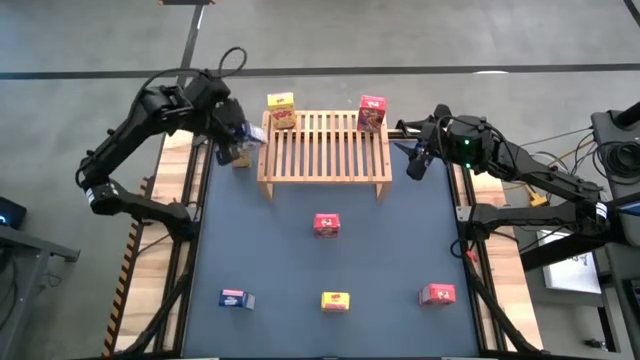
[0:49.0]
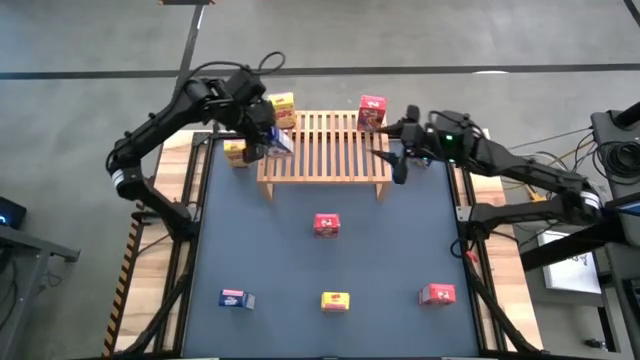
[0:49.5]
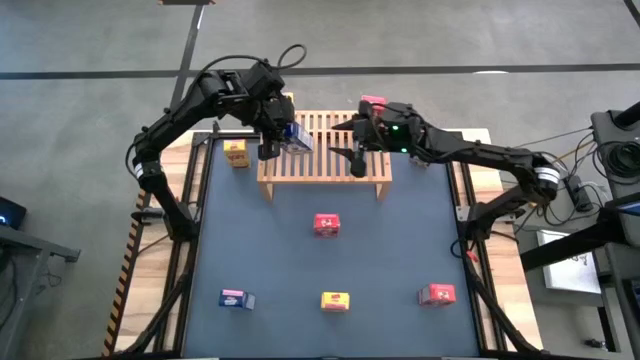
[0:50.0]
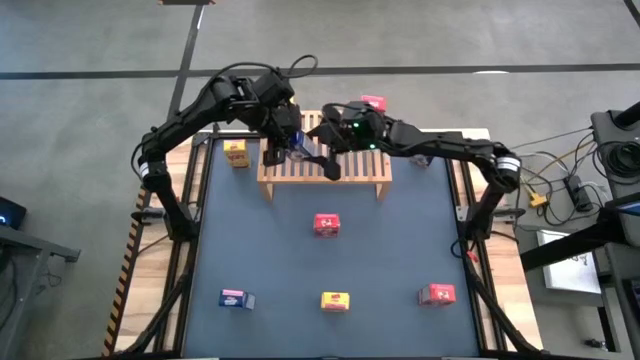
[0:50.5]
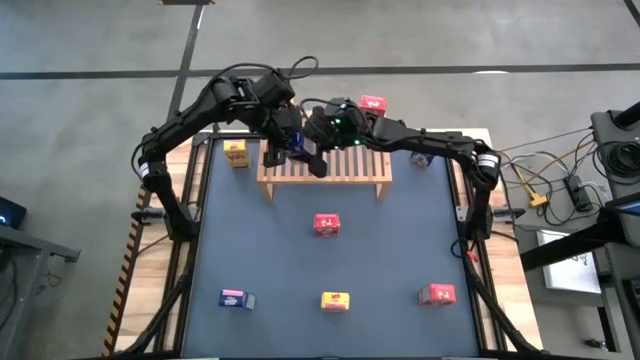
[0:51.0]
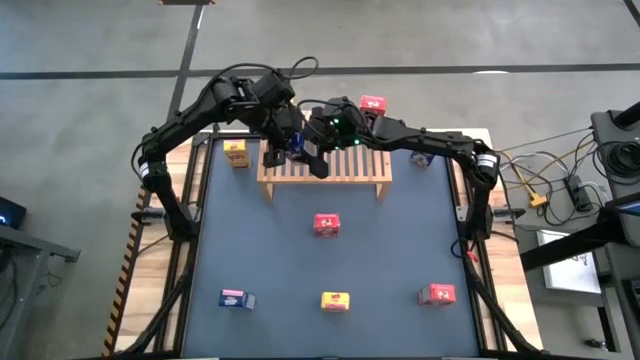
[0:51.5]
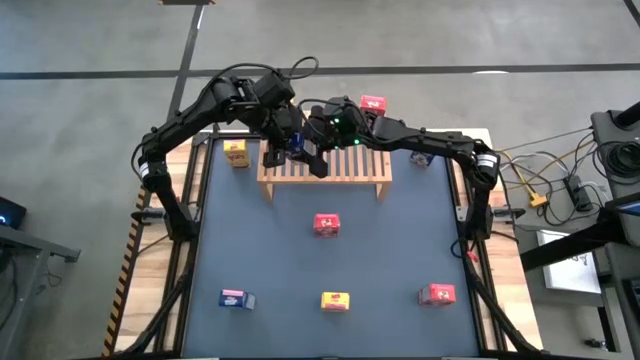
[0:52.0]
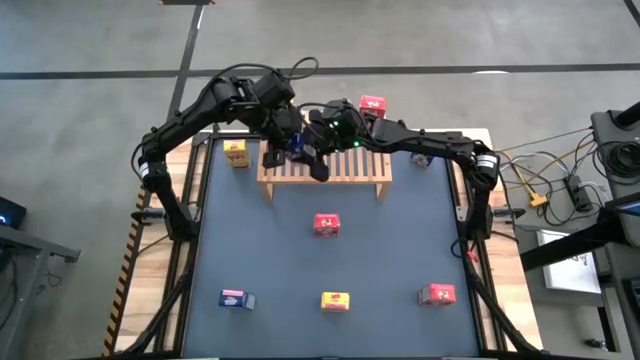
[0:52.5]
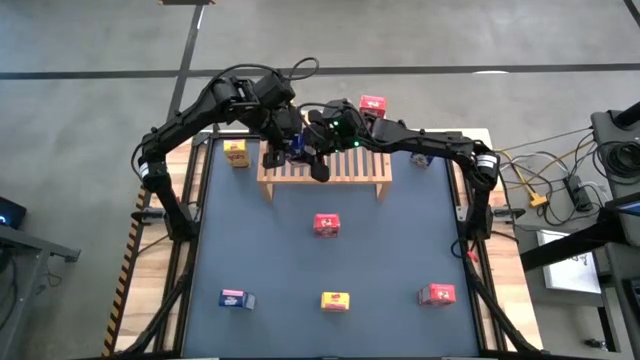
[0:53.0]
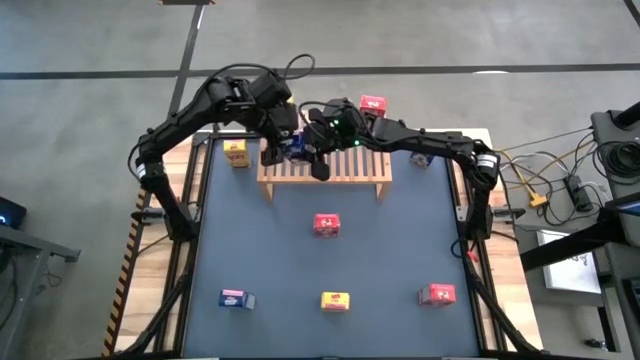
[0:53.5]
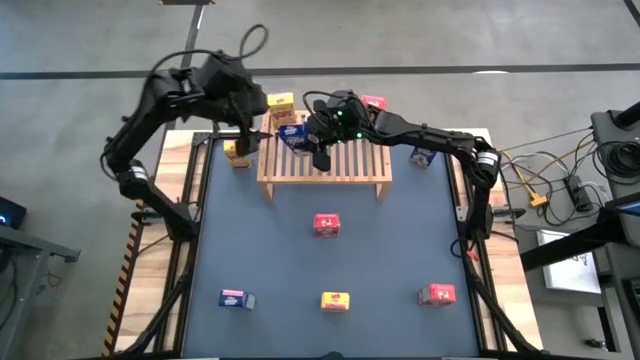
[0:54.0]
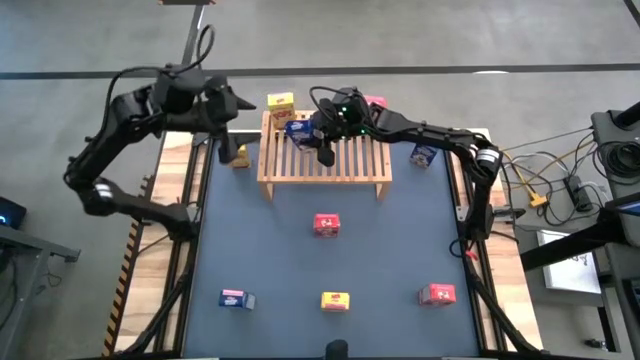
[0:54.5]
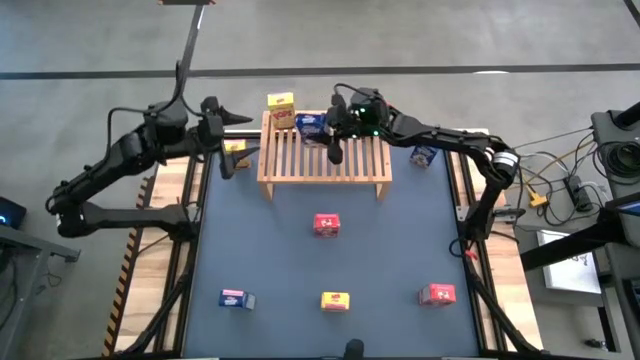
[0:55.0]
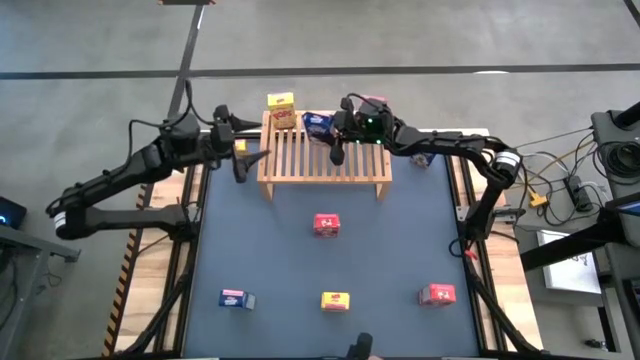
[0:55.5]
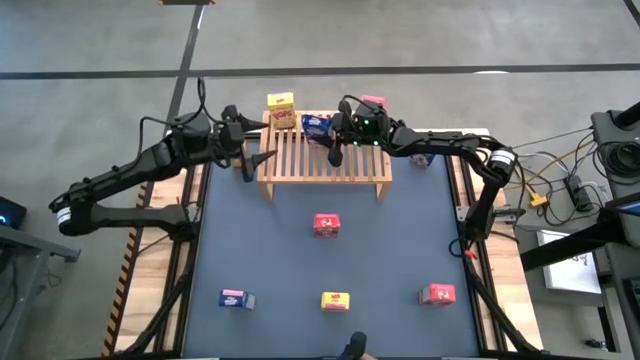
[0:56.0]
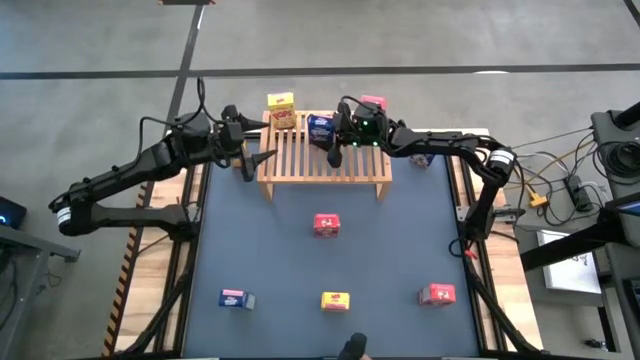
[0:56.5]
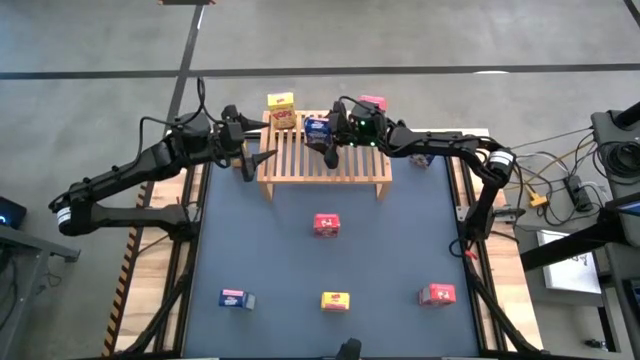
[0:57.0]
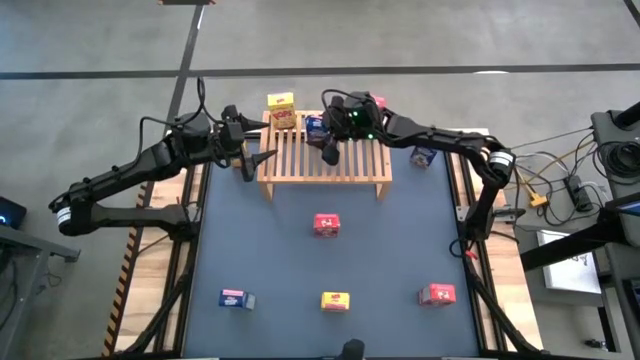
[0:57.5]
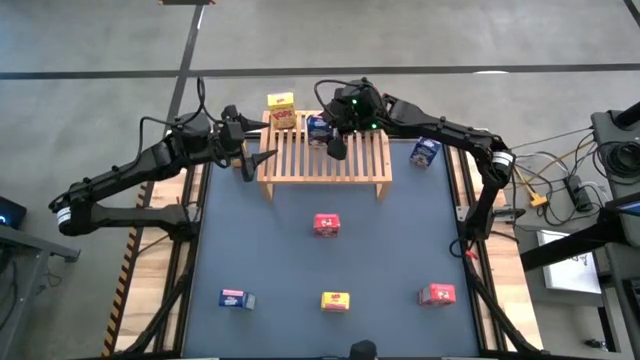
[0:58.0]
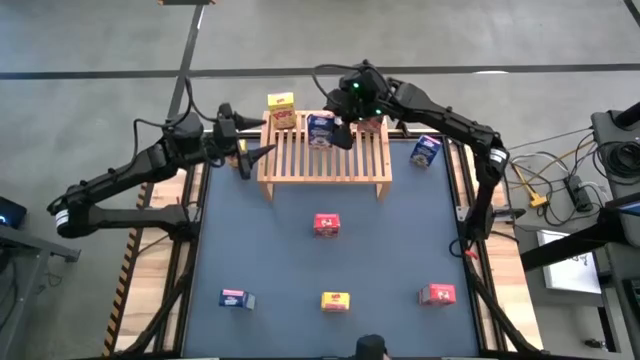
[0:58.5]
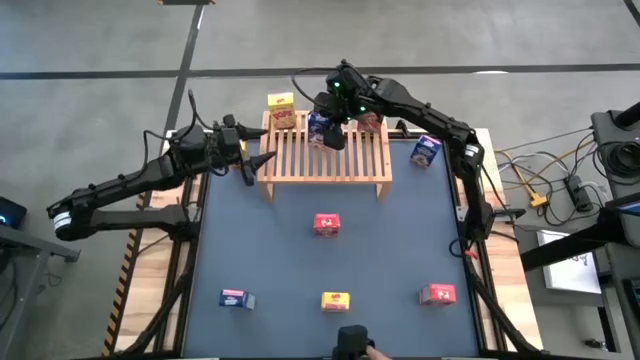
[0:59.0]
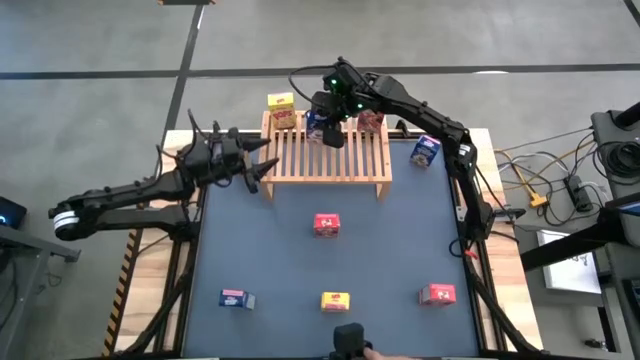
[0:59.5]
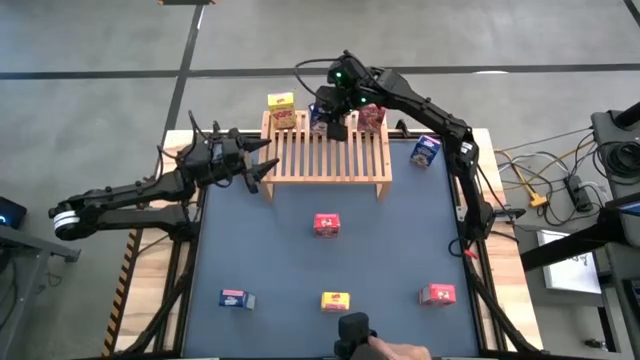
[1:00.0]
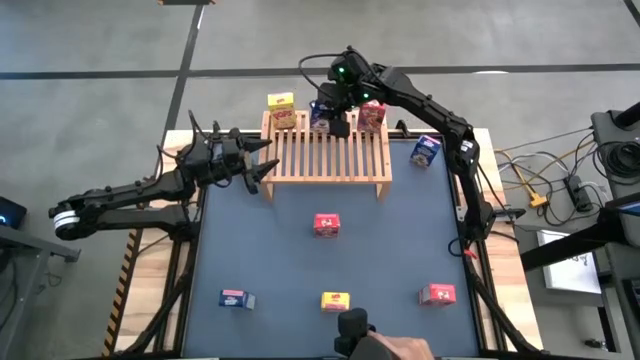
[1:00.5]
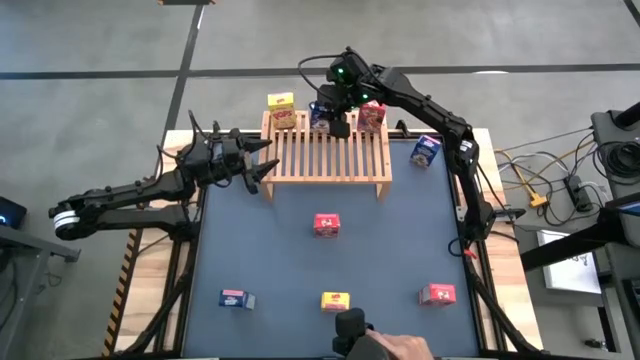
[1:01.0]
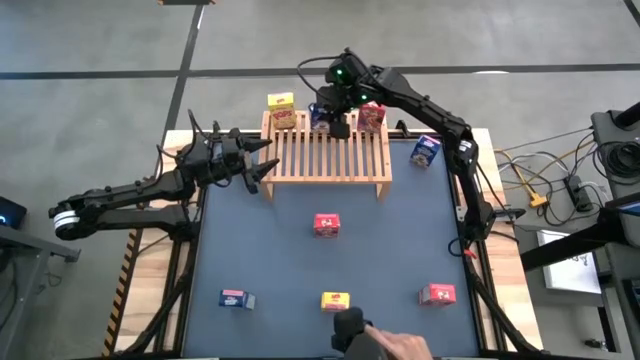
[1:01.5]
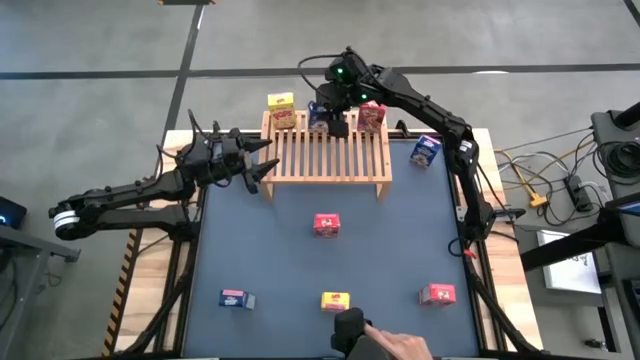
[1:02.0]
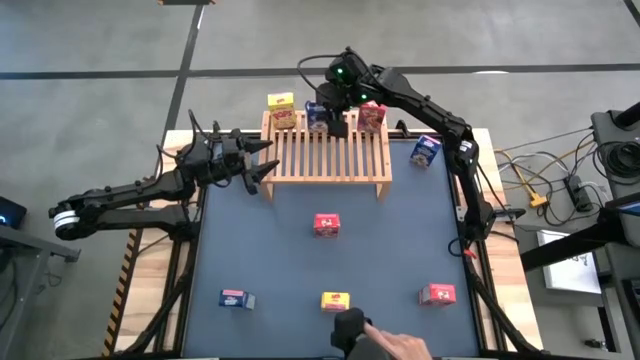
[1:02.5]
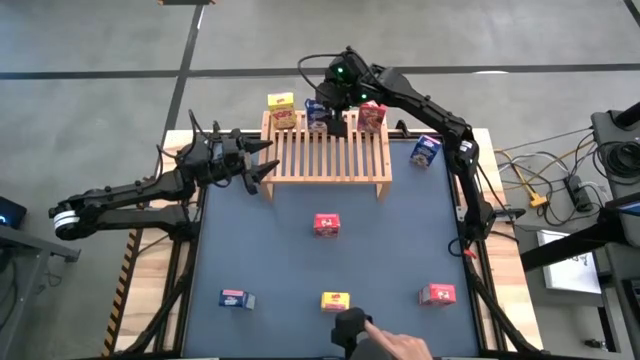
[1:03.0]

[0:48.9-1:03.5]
Task: Stack cereal on shelf
Put the top left blue cereal box on the shelf

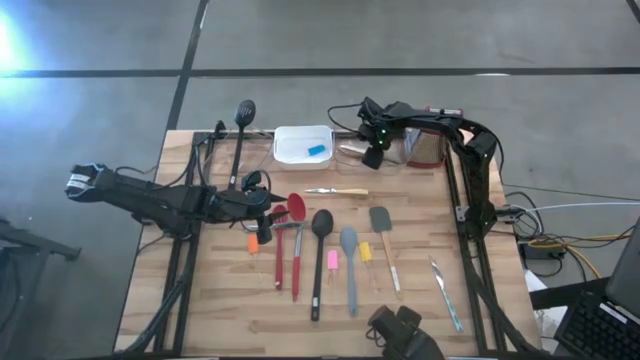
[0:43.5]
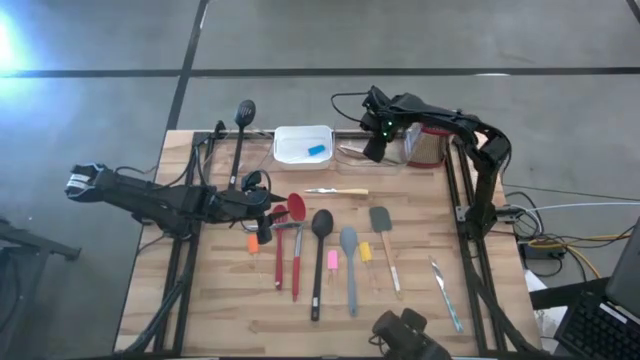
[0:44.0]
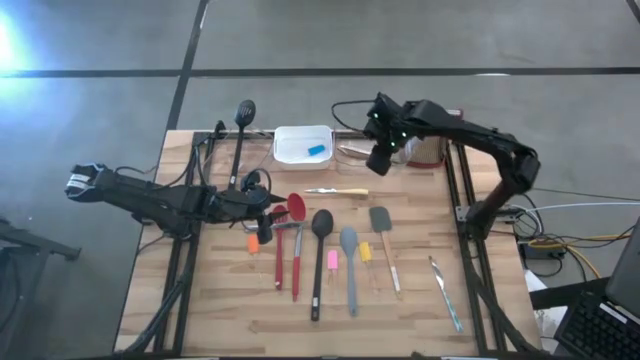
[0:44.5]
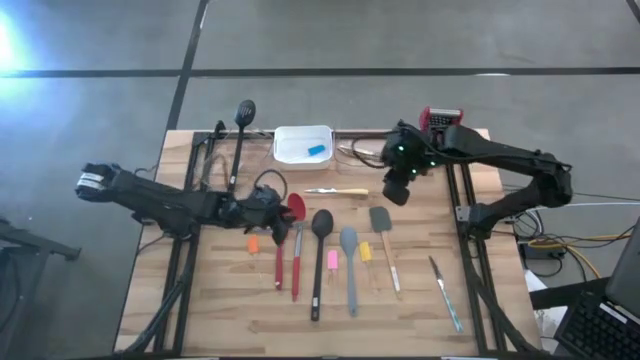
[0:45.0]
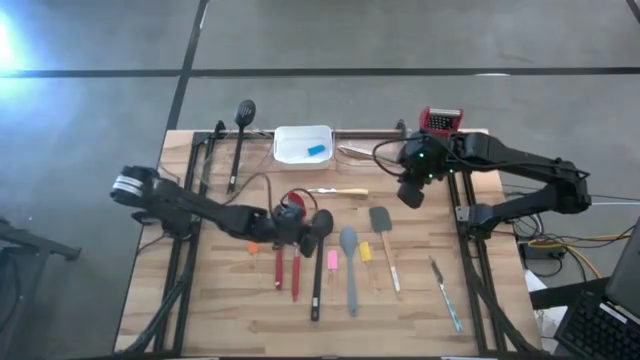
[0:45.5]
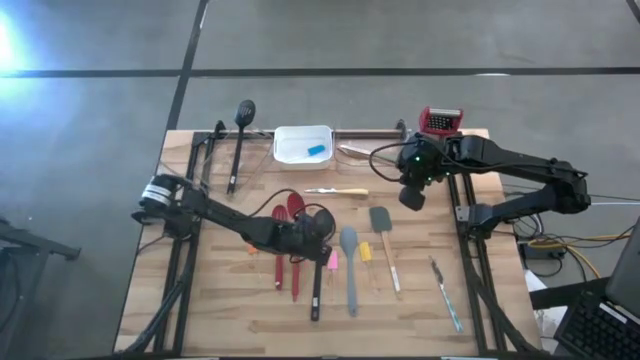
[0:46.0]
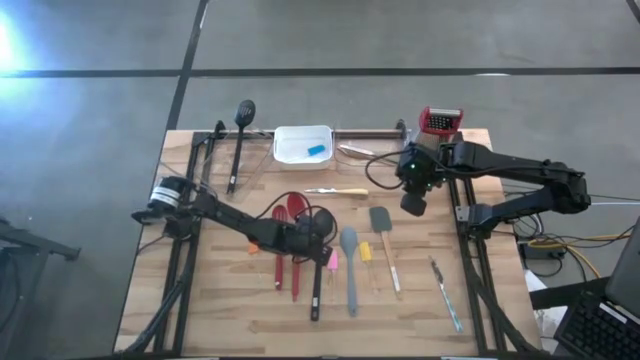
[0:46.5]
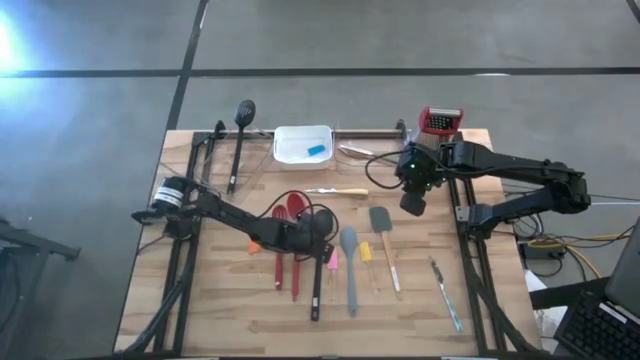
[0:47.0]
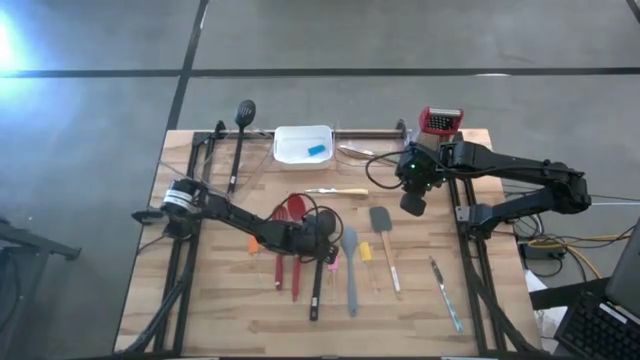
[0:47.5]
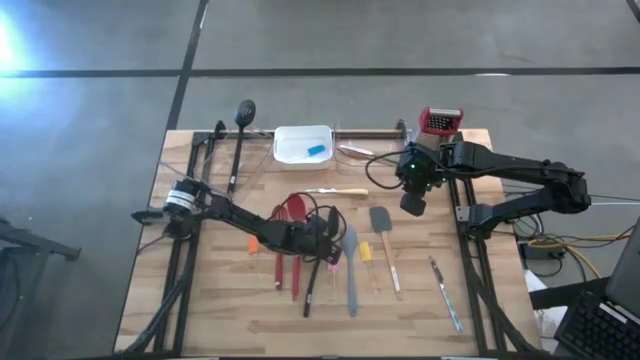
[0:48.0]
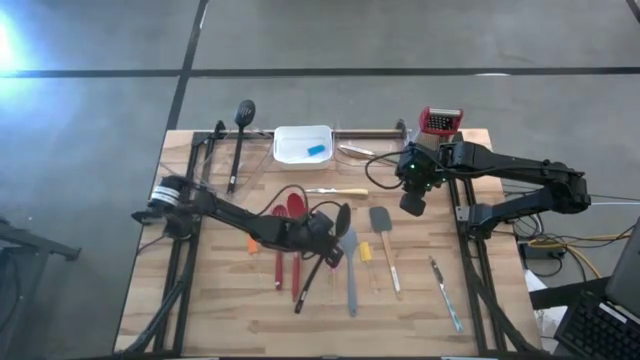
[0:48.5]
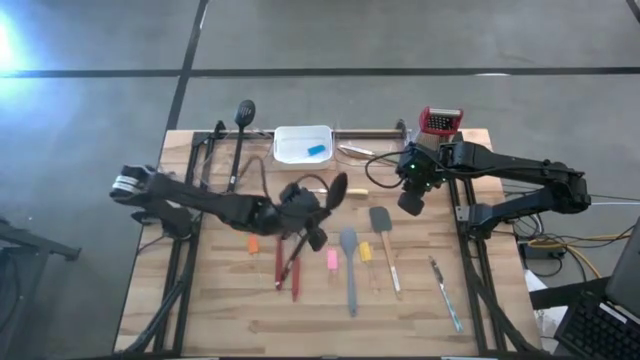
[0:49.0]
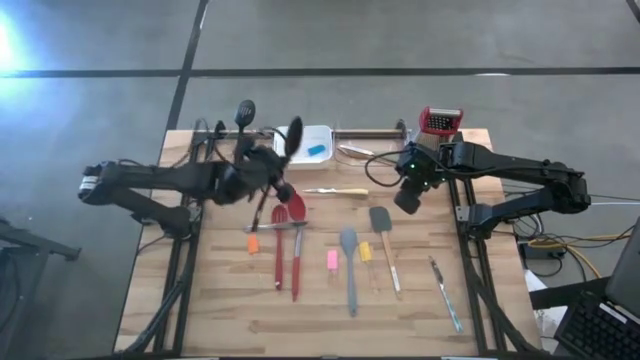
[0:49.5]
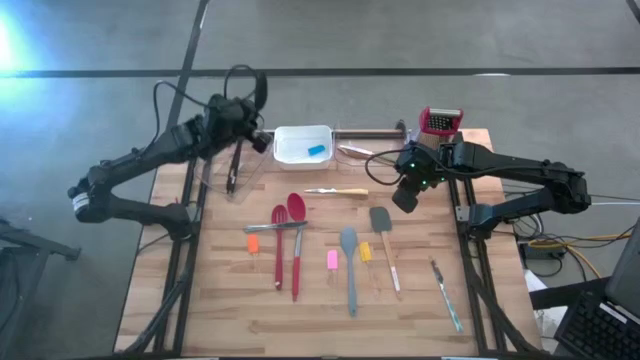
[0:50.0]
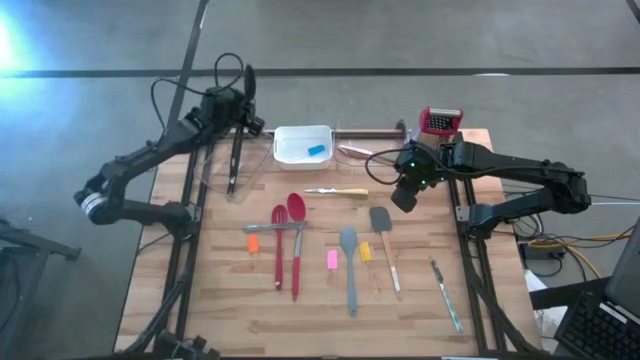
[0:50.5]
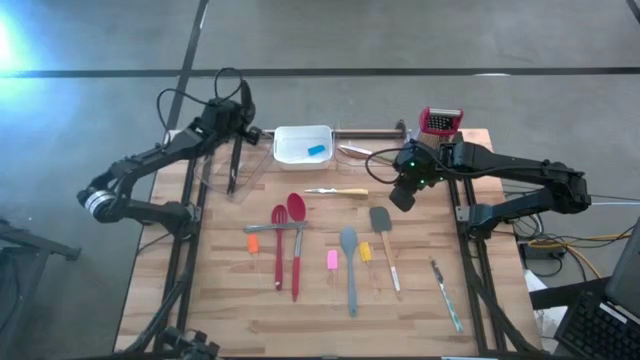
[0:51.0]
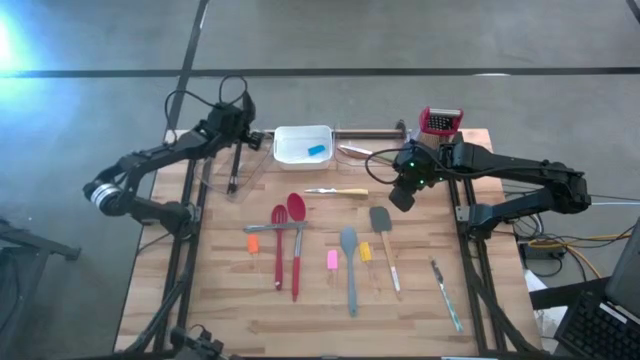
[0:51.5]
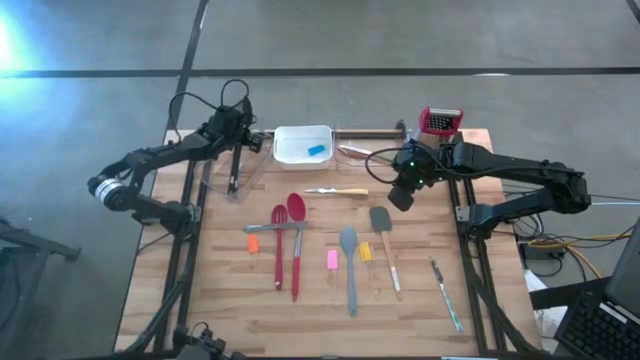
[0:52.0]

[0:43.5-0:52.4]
Task: Pick & Place Kitchen Items
Put the black serving spoon into the left transparent bin
